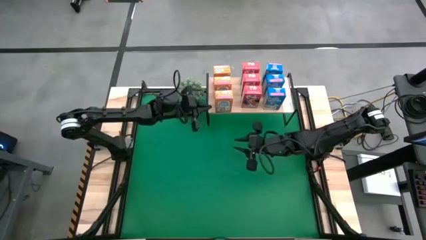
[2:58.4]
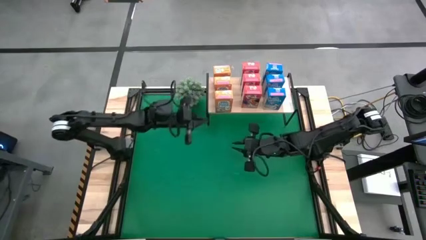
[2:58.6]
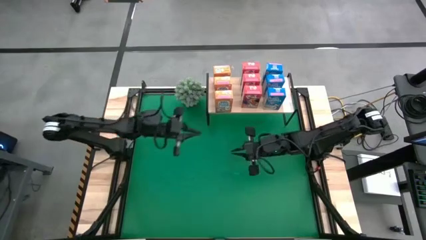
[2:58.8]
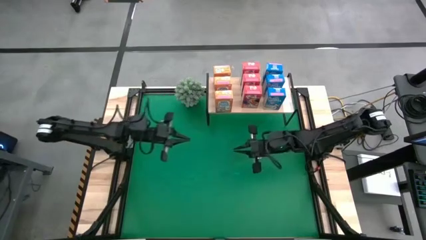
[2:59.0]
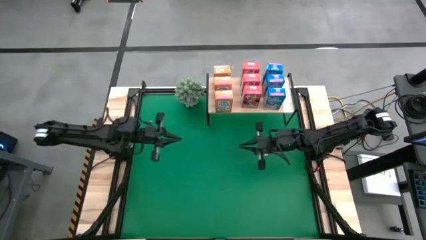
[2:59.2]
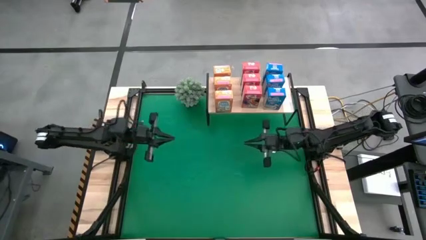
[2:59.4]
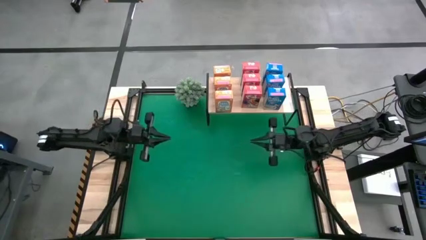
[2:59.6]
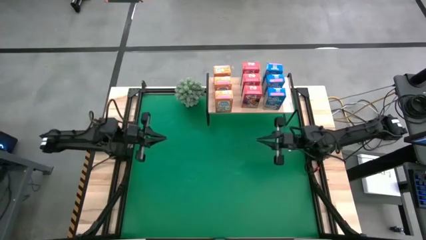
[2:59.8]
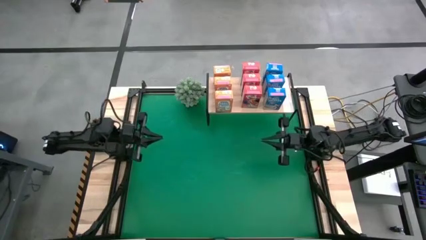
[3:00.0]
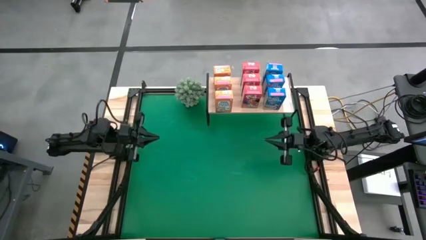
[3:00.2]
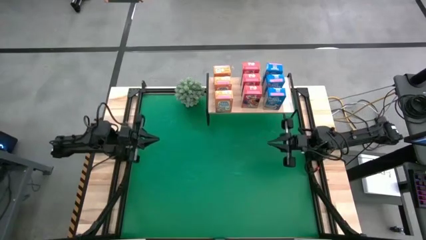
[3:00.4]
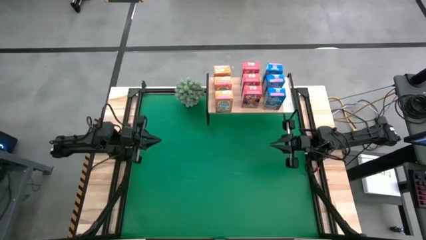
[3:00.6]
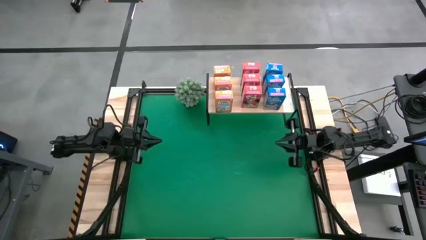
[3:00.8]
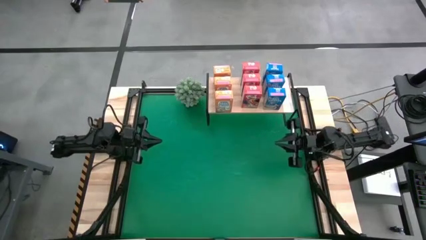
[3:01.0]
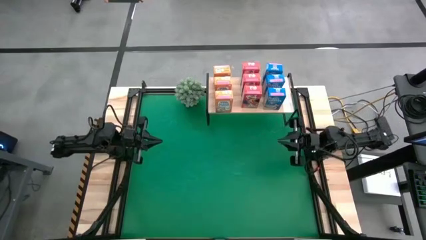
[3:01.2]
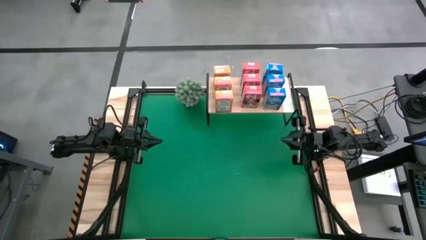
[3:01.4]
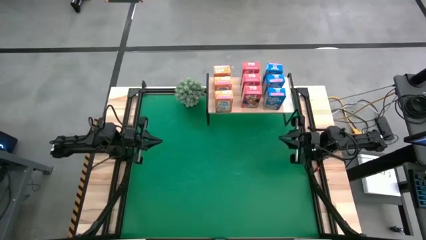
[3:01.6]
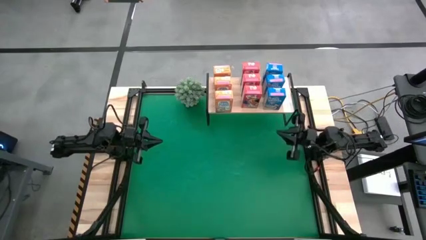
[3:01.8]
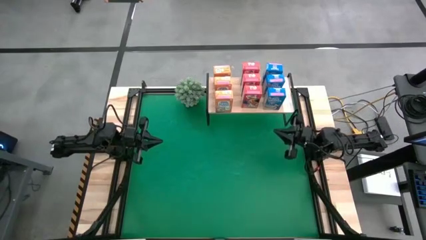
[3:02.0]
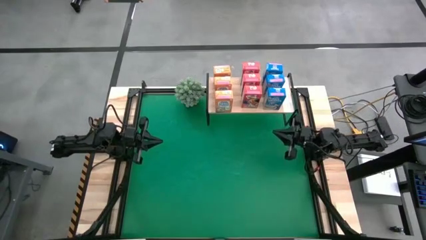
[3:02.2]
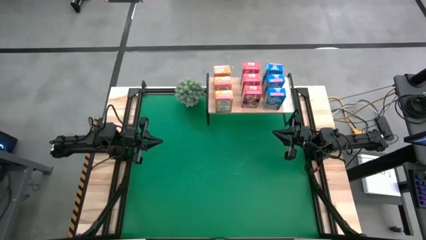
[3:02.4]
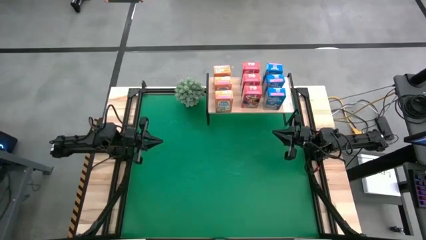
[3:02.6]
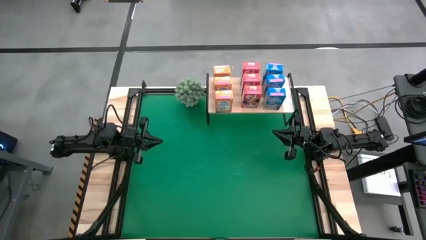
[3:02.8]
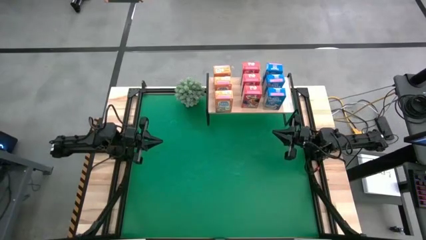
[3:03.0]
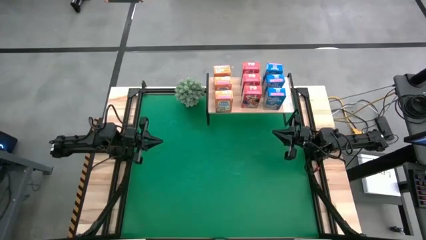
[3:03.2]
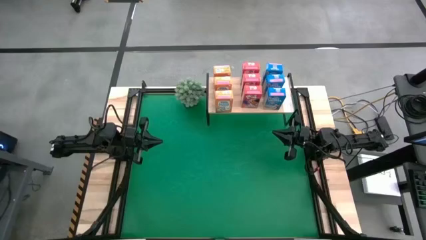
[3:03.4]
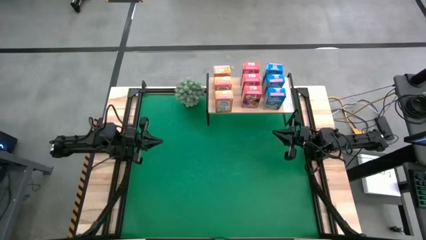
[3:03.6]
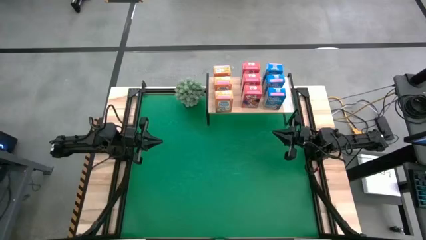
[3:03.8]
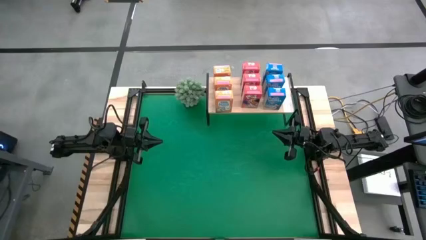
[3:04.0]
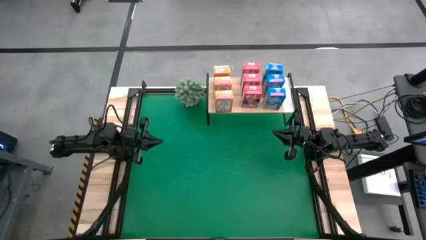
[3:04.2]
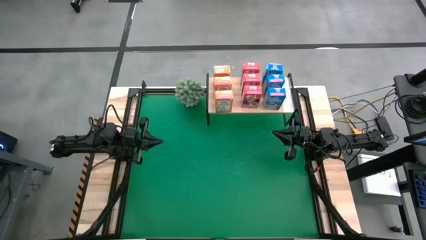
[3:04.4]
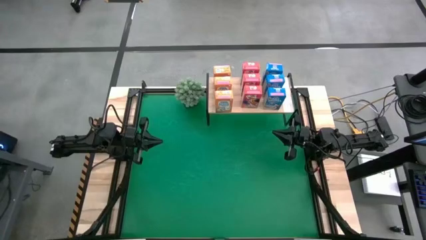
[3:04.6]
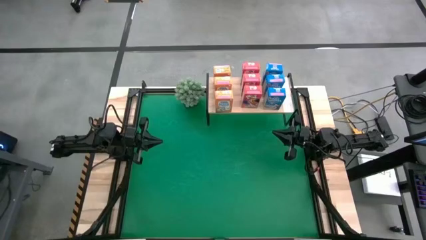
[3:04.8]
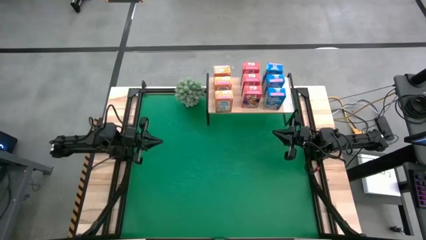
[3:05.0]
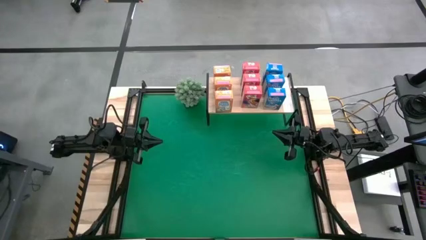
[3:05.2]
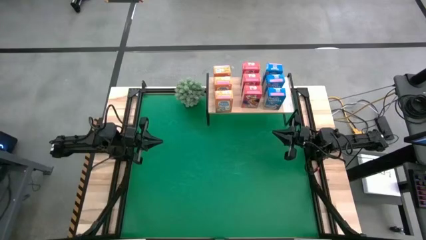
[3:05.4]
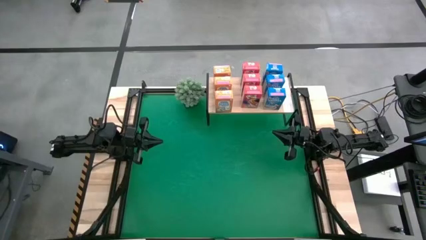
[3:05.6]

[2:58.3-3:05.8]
Task: Stack cereal on shelf
Return to Home Position

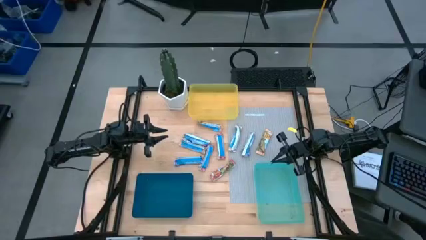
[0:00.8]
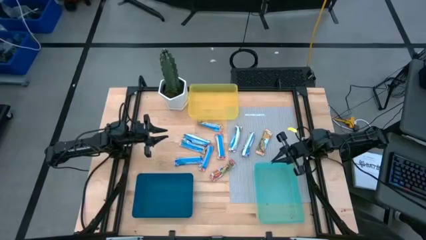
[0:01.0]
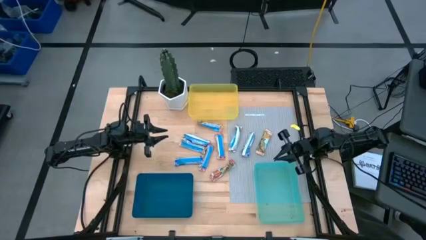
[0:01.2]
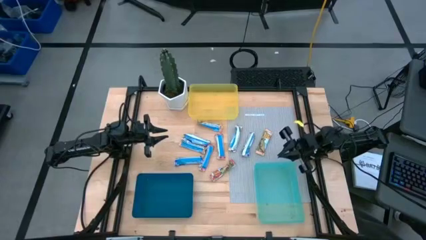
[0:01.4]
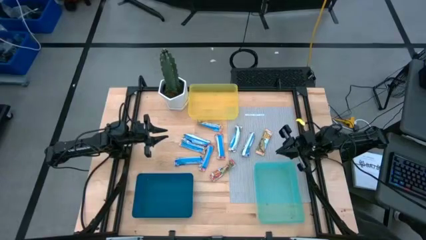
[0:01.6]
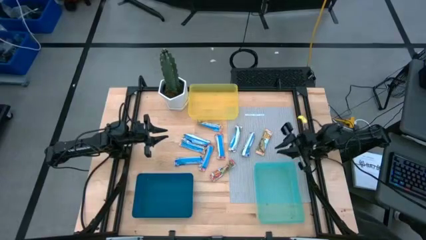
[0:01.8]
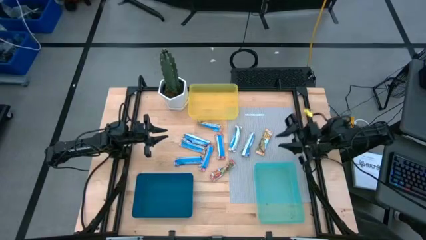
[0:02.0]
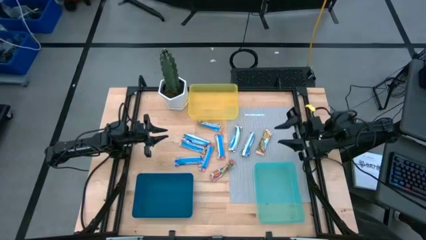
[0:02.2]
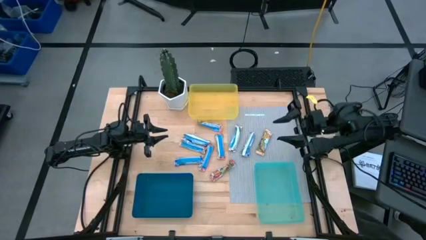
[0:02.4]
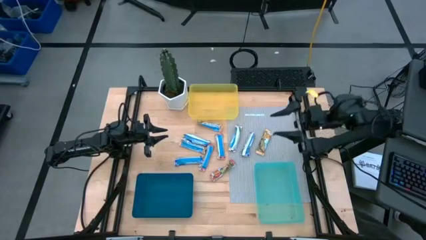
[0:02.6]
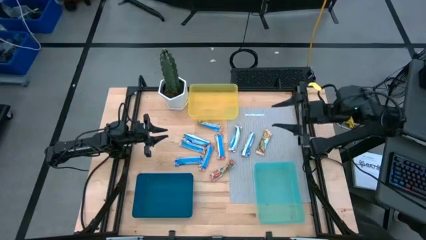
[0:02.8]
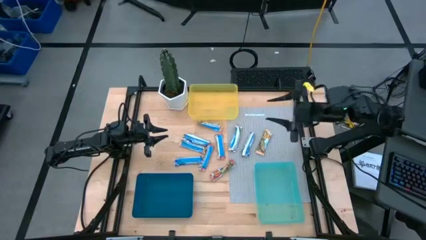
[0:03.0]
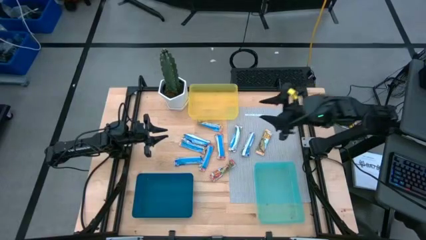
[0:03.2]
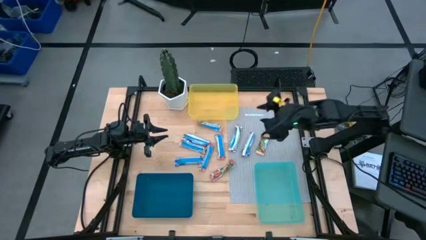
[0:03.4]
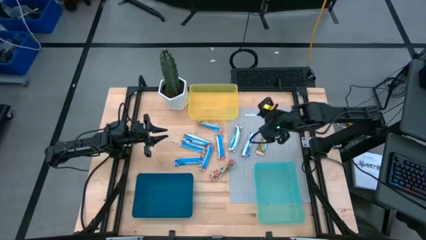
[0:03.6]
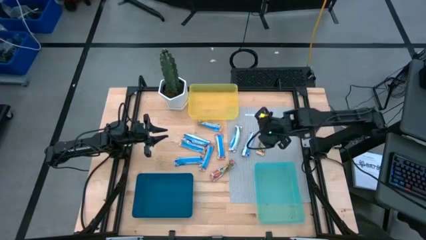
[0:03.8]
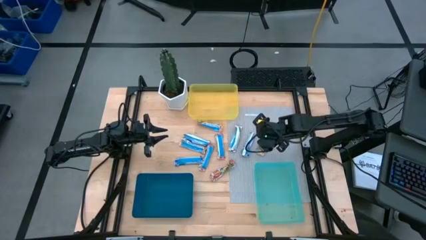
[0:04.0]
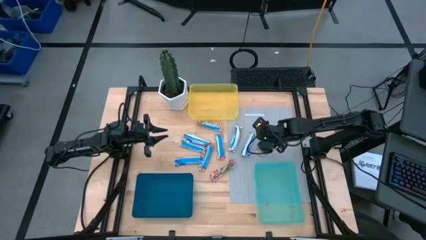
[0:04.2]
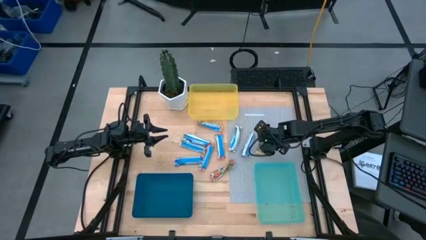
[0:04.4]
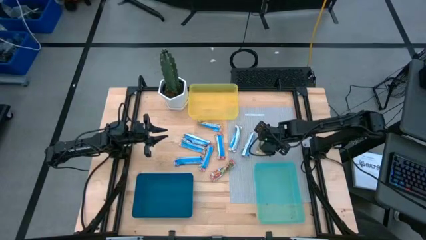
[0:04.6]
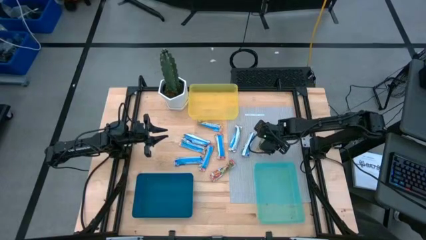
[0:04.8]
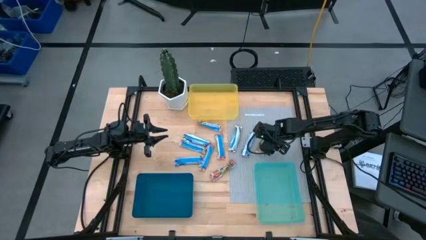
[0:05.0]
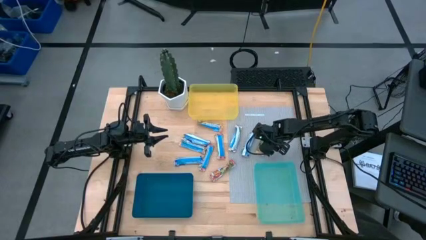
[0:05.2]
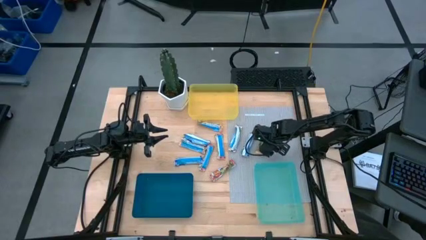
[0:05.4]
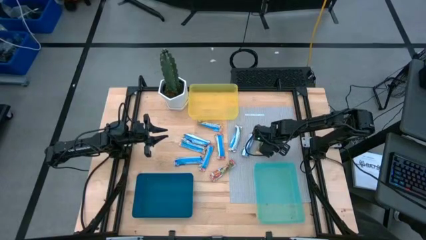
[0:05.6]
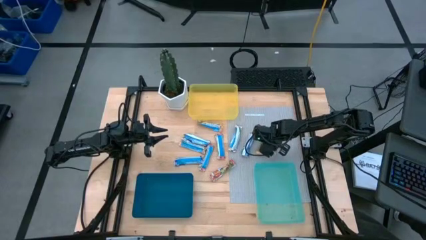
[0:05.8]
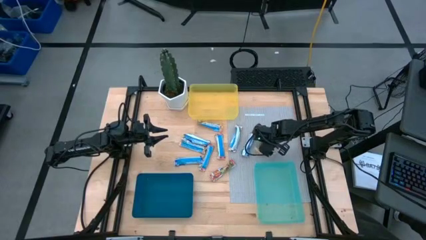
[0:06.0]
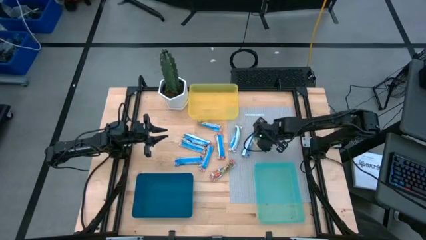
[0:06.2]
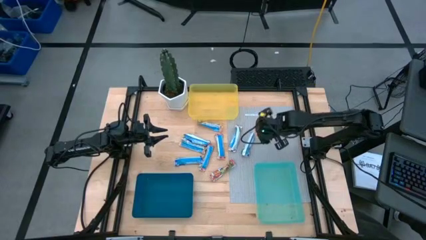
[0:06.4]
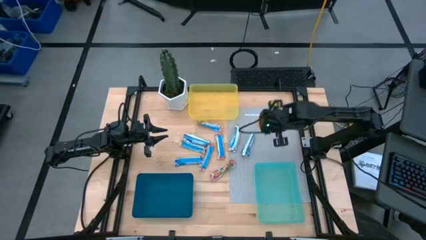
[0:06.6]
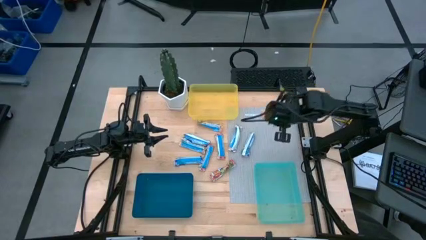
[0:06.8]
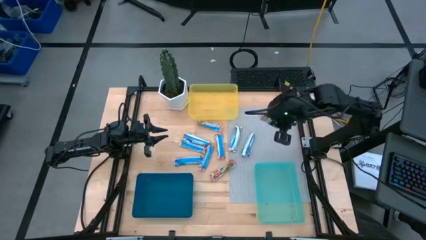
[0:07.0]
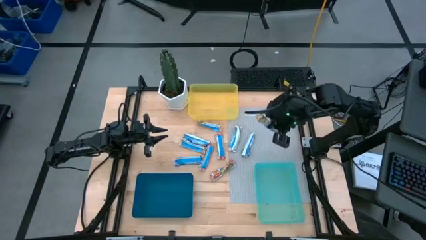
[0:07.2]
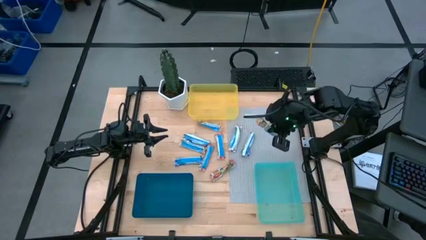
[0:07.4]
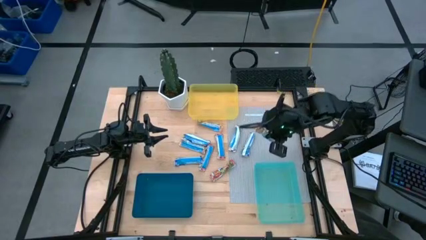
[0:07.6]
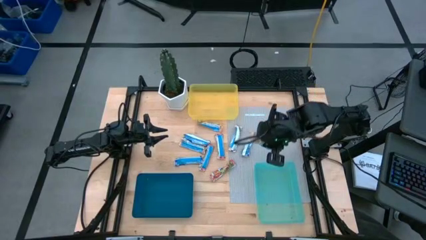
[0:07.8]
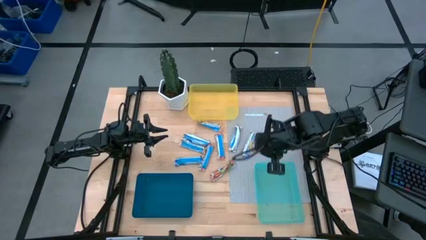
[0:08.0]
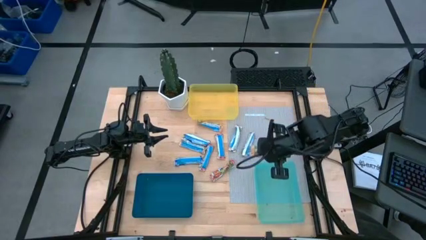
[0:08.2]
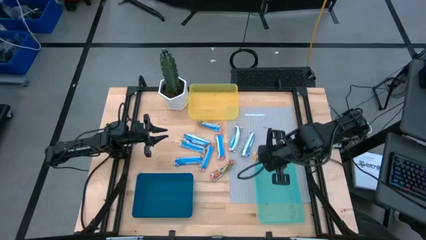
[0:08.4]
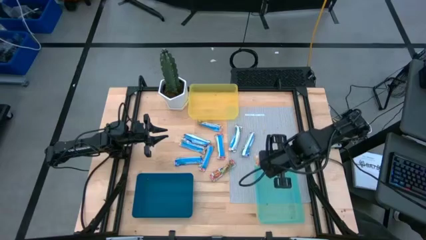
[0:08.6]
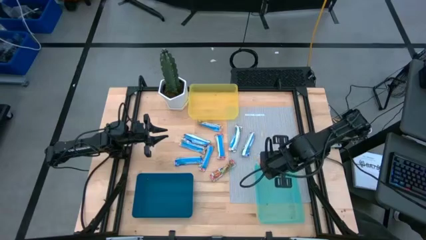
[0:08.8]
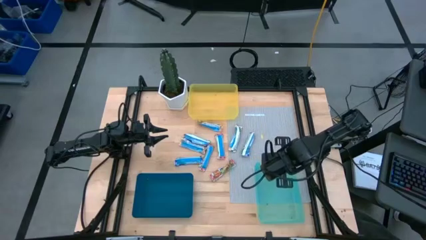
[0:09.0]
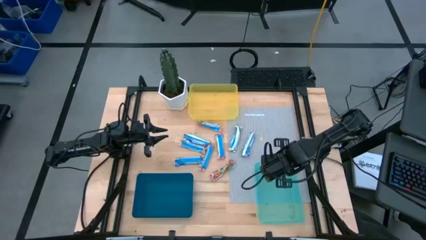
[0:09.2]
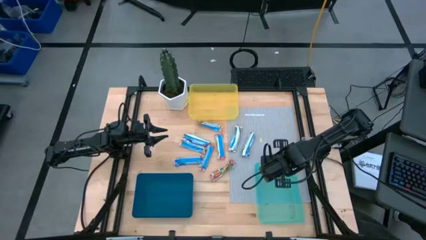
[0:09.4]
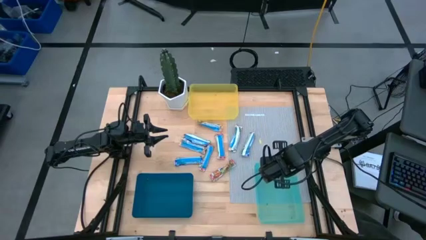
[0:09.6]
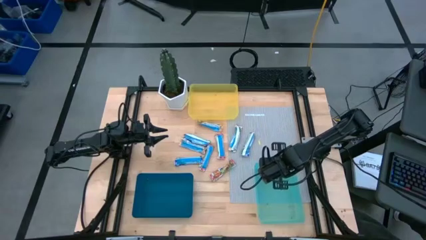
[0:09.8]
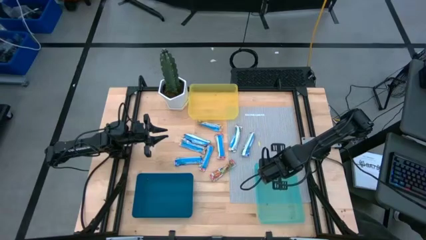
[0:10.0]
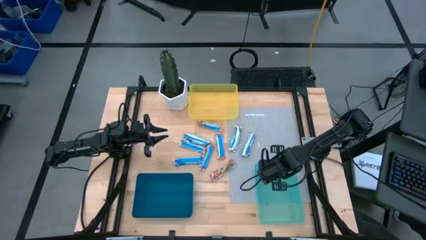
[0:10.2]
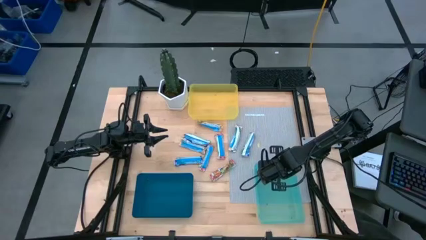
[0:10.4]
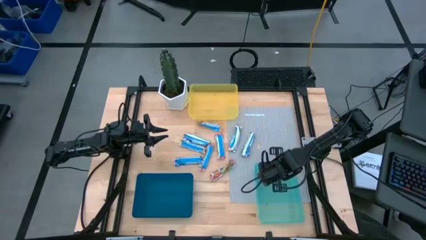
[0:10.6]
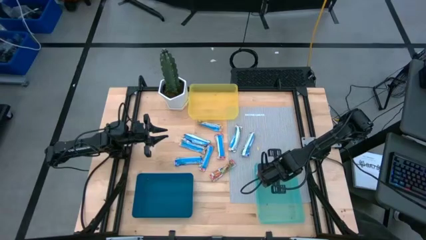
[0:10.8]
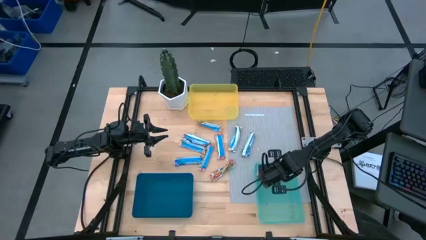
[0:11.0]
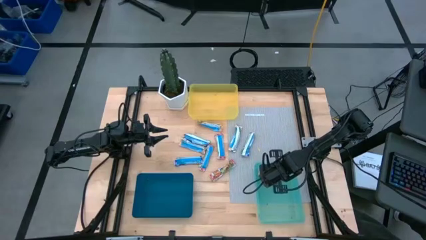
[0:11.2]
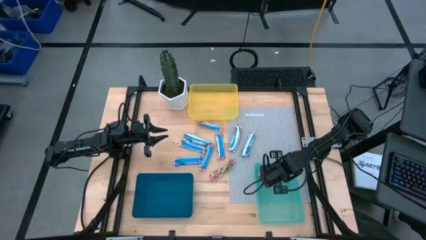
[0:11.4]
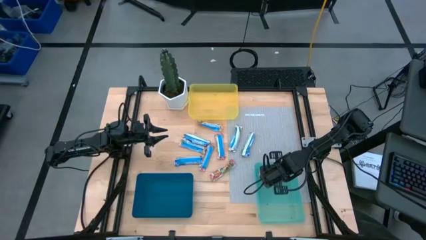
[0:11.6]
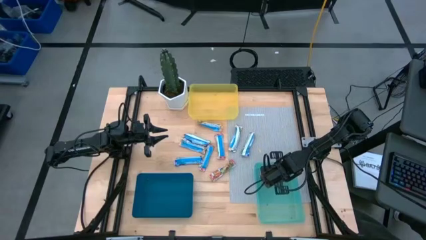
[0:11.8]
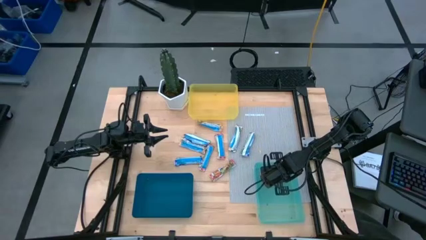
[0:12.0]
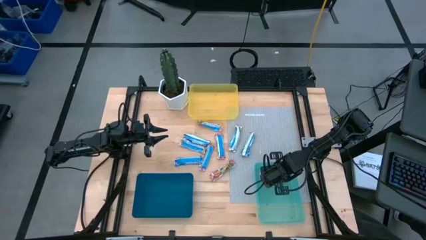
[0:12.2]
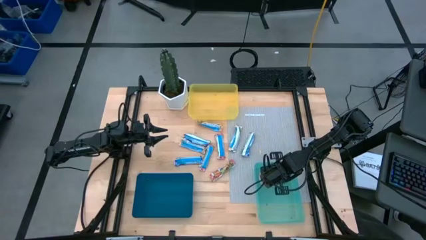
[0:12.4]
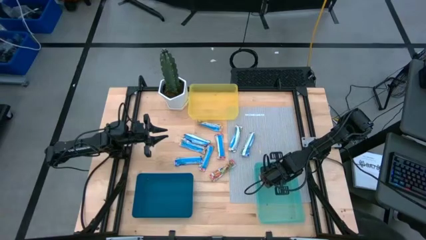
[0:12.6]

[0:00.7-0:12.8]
Task: Pick and place Granola Bars by type
Put the yellow granola bar into the green bin
